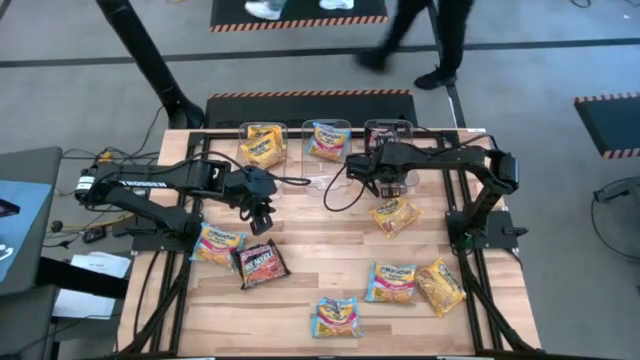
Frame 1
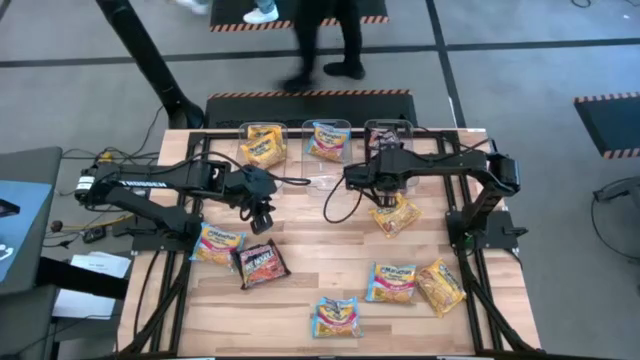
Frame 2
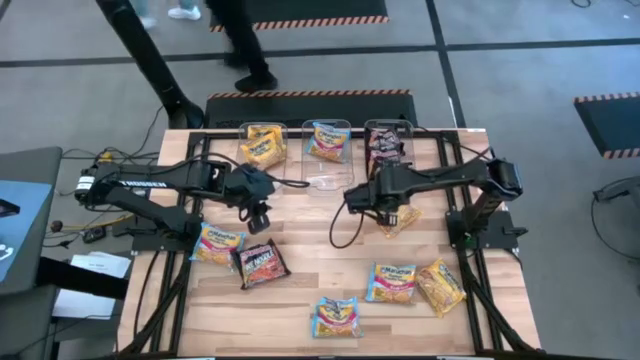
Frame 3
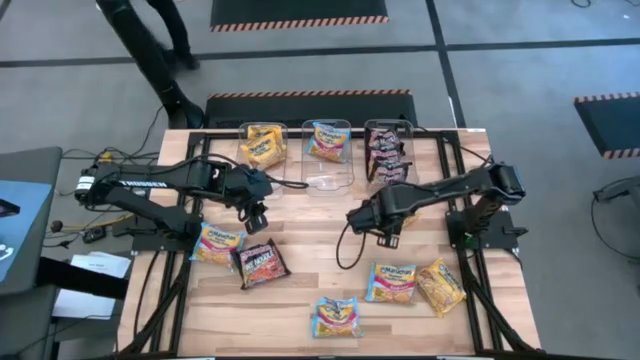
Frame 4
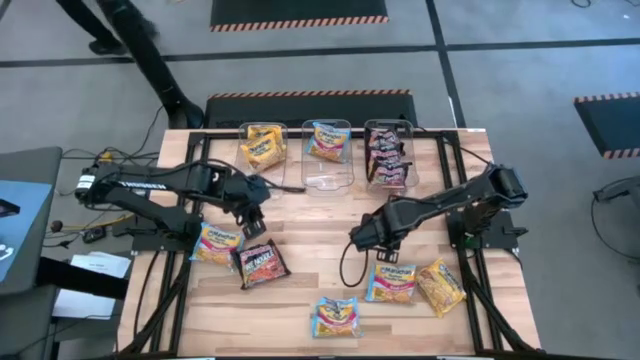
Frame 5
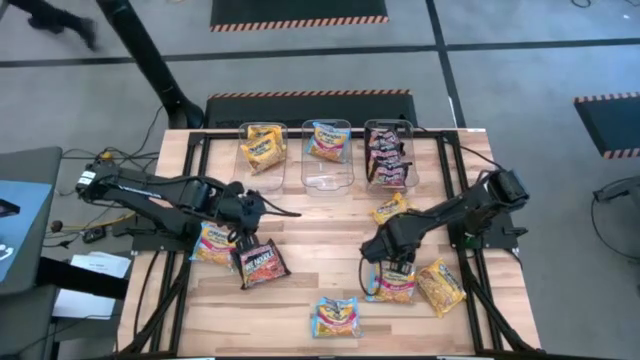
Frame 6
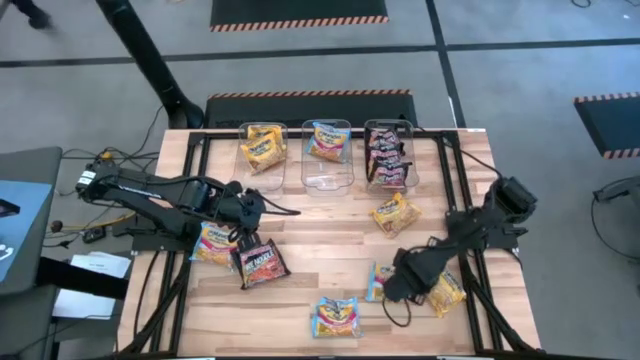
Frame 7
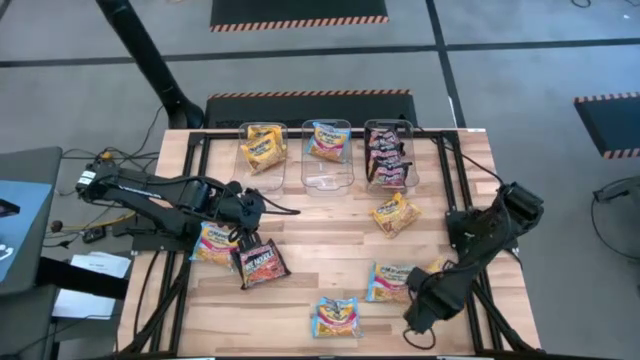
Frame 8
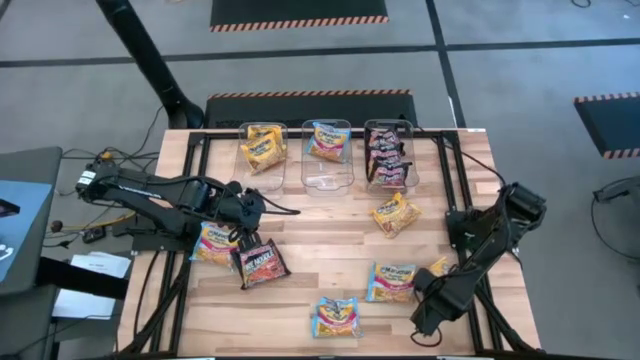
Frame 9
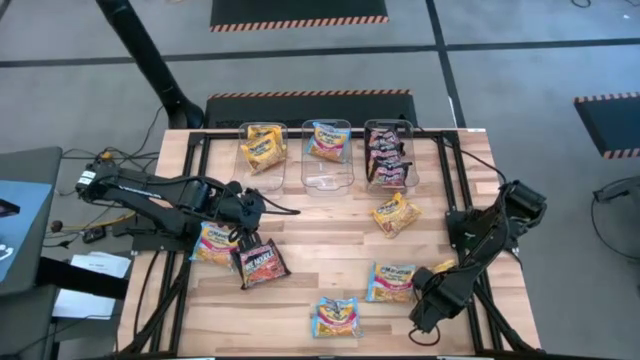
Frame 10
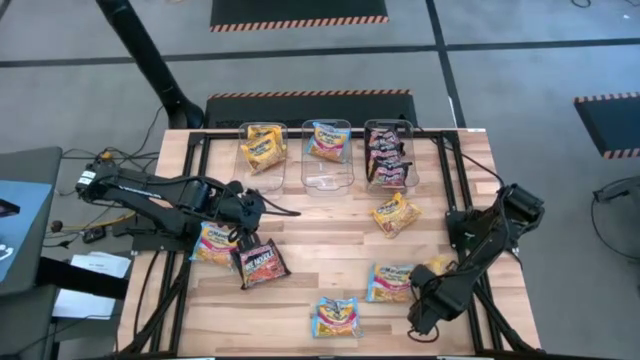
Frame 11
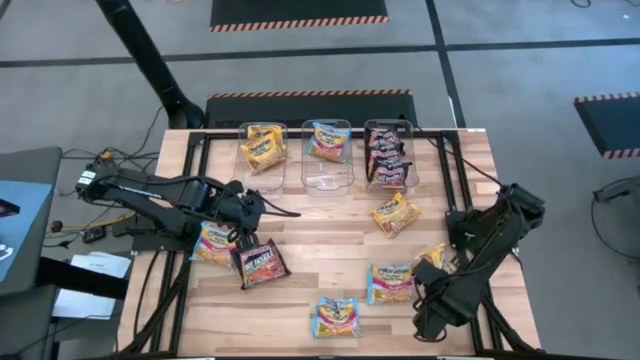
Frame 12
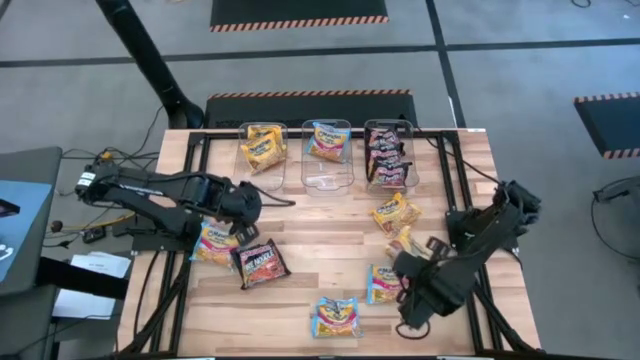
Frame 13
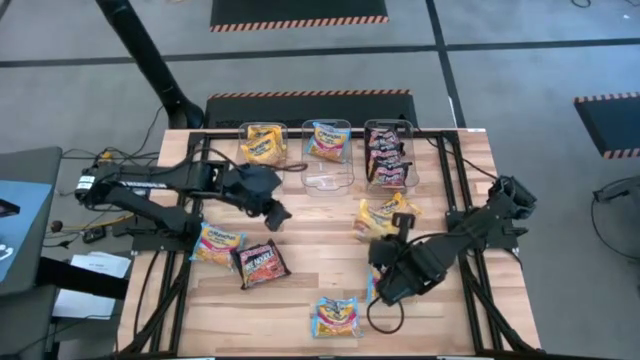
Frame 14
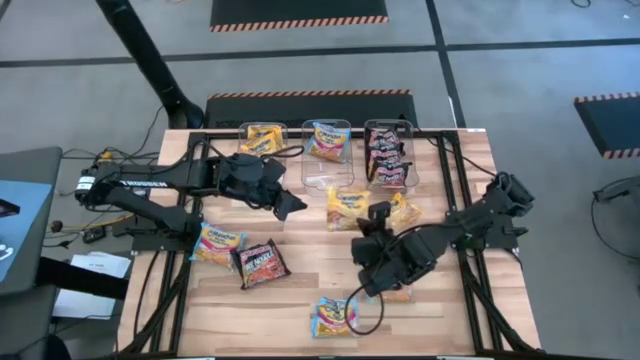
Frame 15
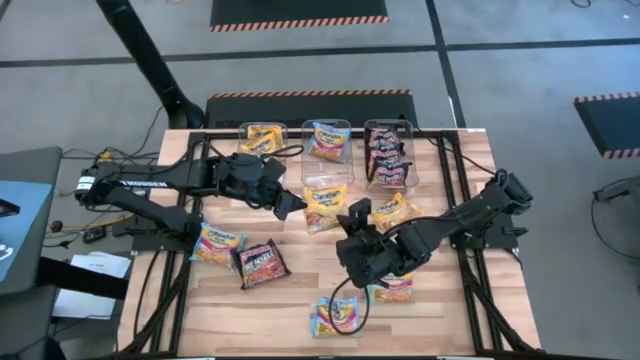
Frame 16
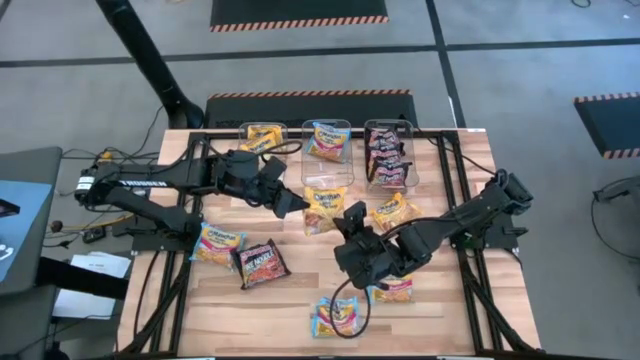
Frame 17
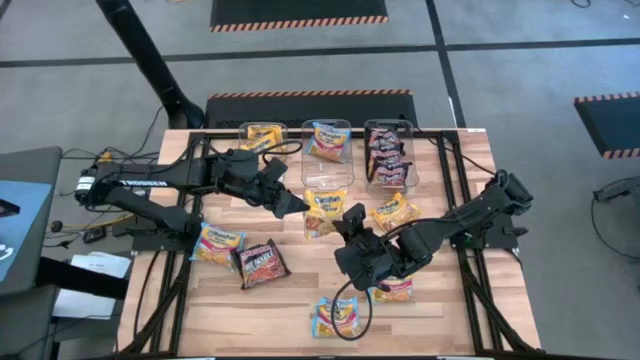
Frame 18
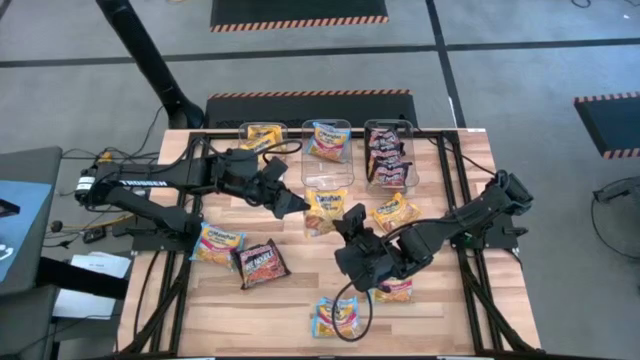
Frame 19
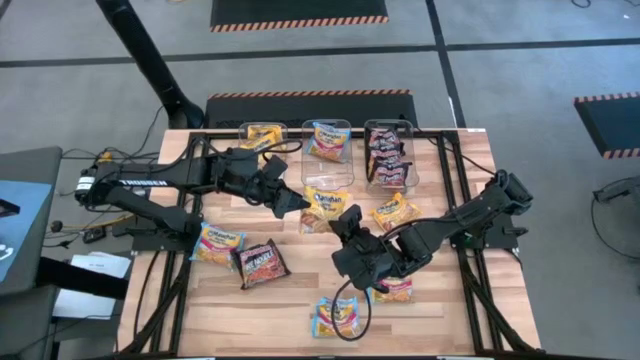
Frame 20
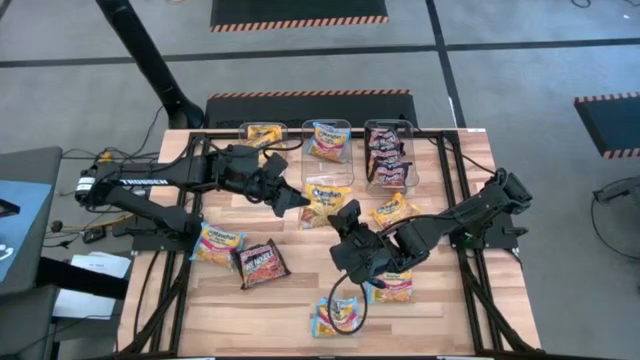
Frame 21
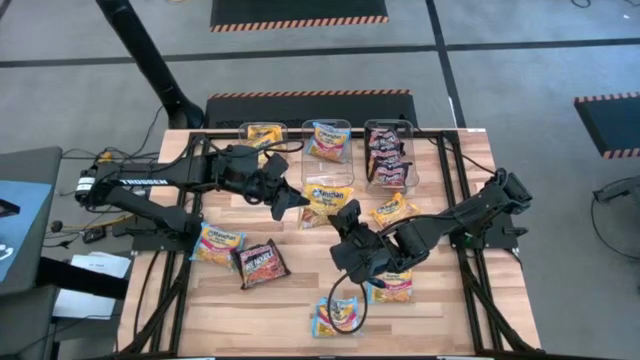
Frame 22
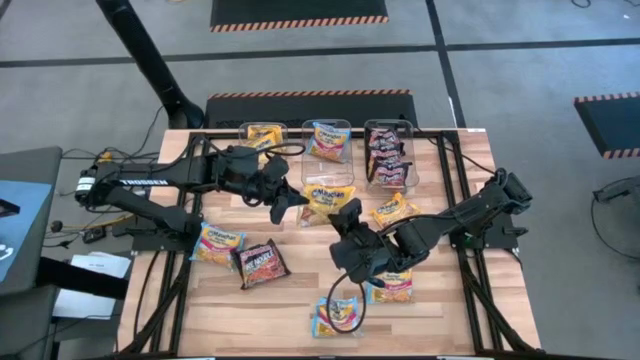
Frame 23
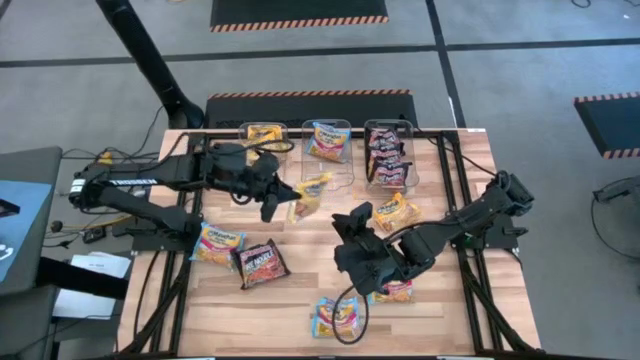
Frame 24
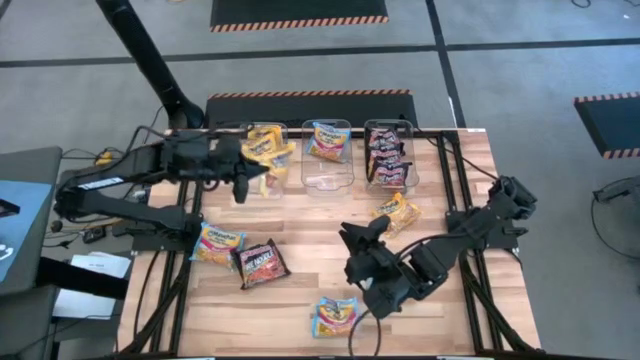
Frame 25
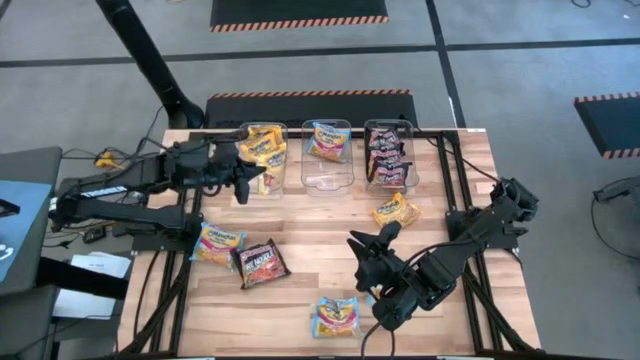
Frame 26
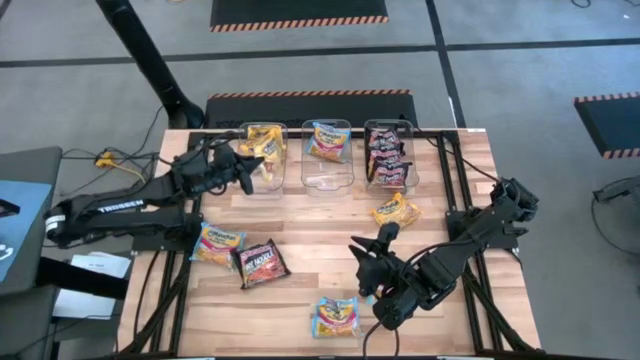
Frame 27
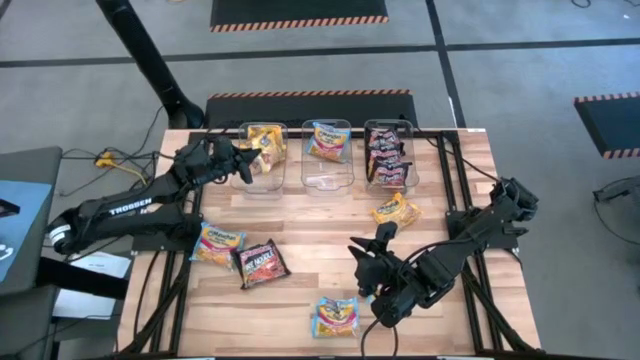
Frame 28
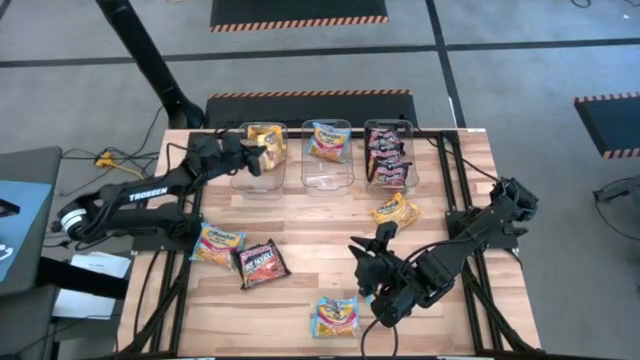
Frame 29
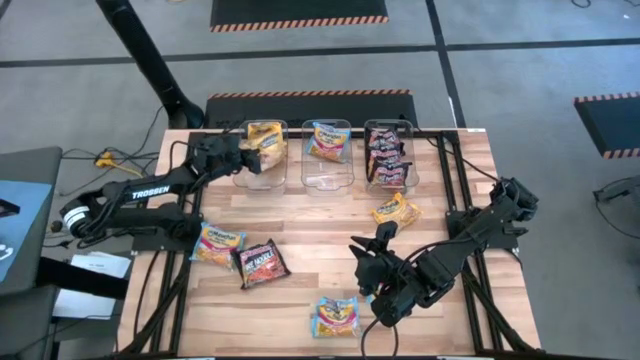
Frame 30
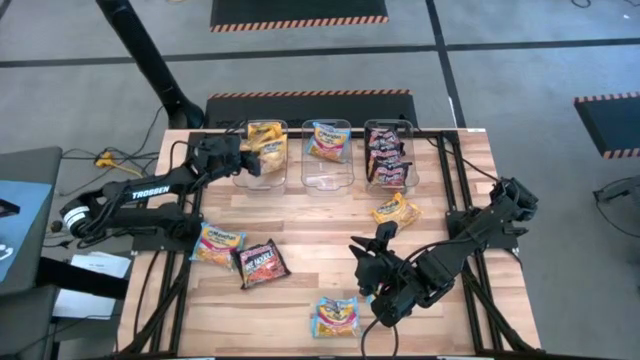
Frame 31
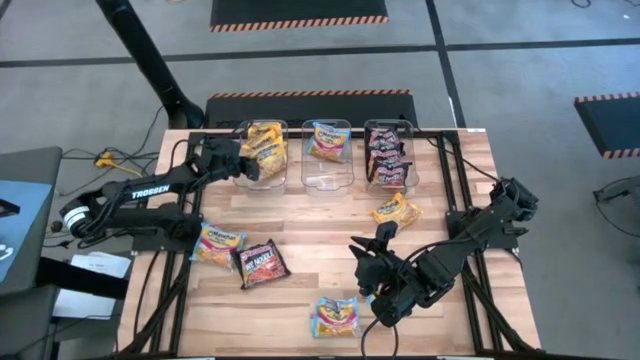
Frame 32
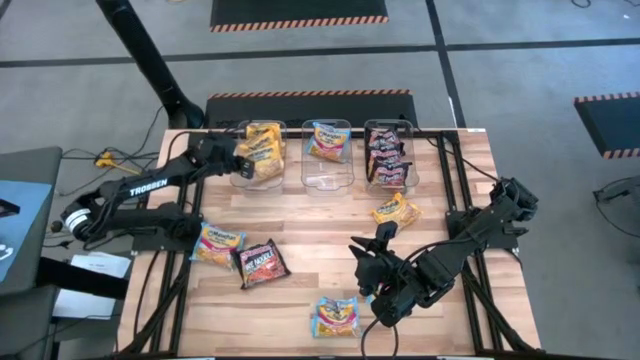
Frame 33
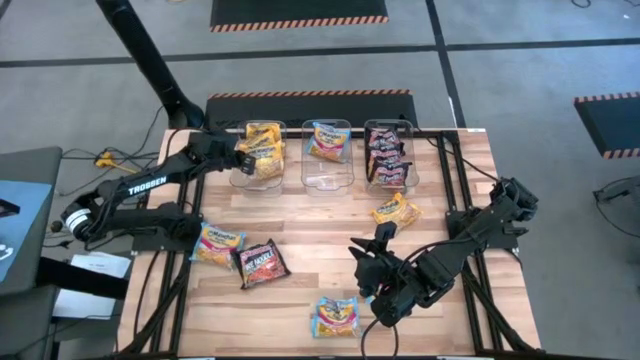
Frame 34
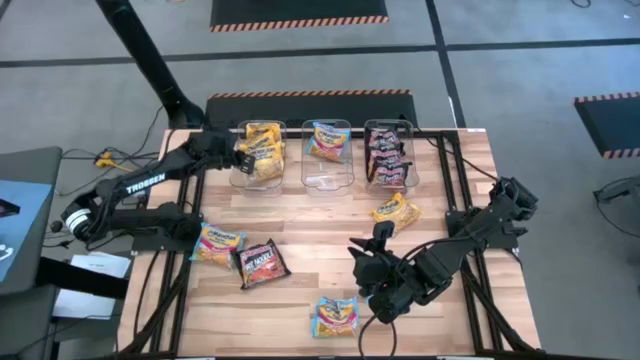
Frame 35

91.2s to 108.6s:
Task: Sort Maruchan noodles
Put the yellow noodle pack into the left transparent bin

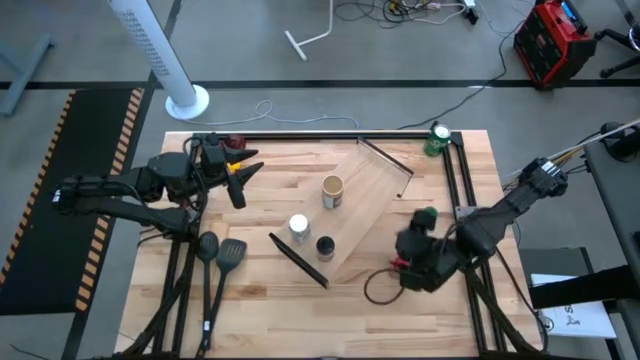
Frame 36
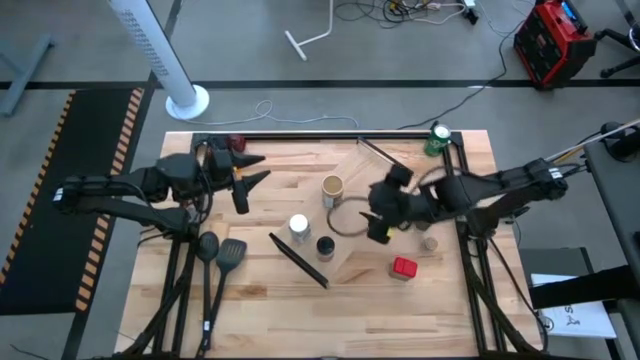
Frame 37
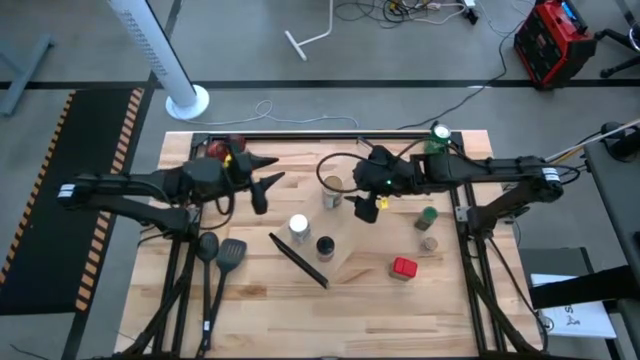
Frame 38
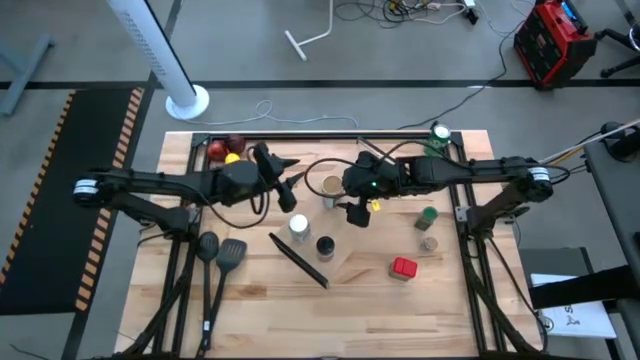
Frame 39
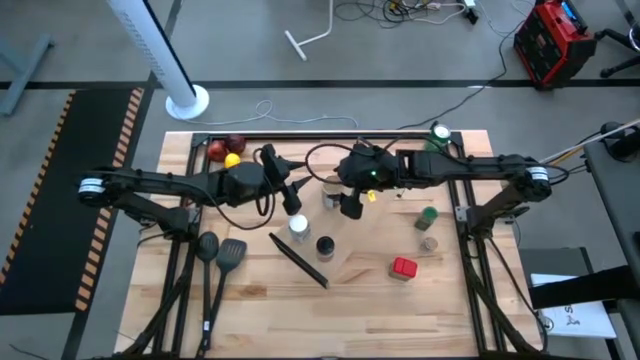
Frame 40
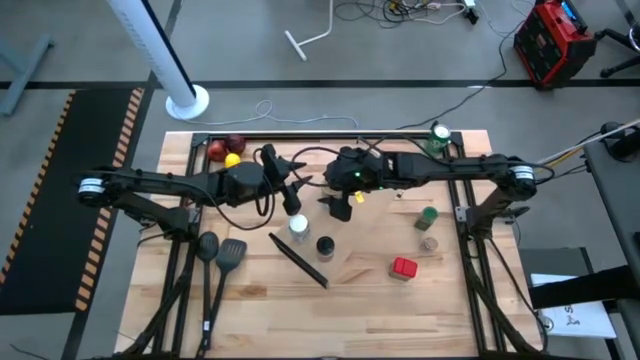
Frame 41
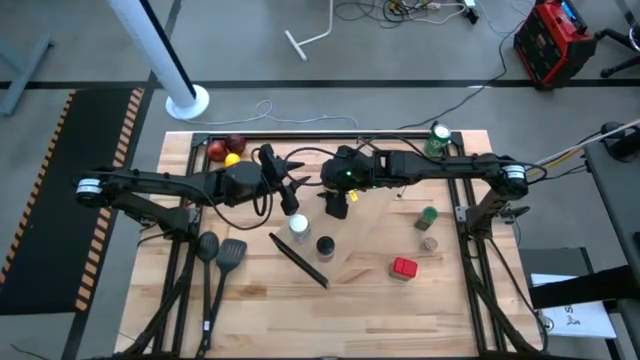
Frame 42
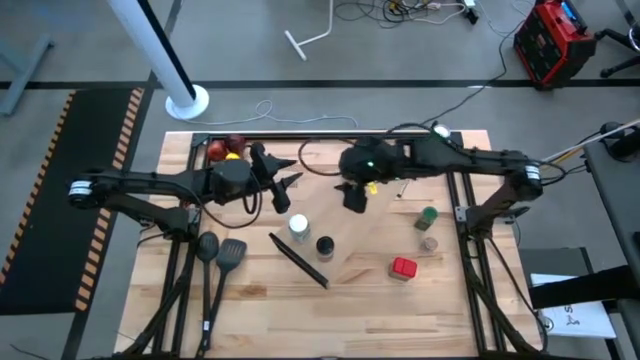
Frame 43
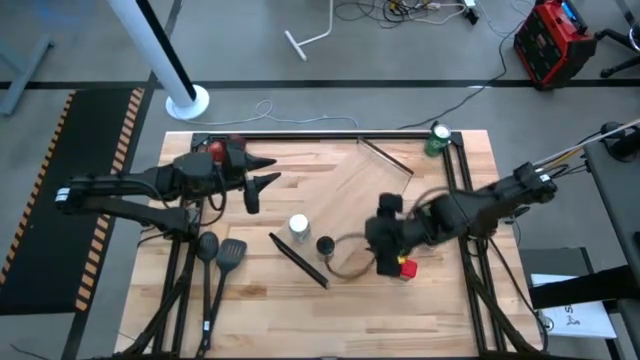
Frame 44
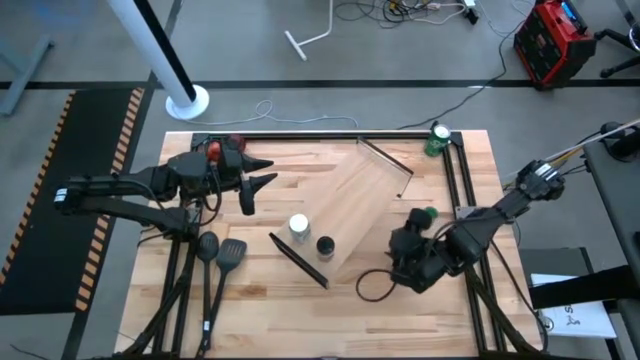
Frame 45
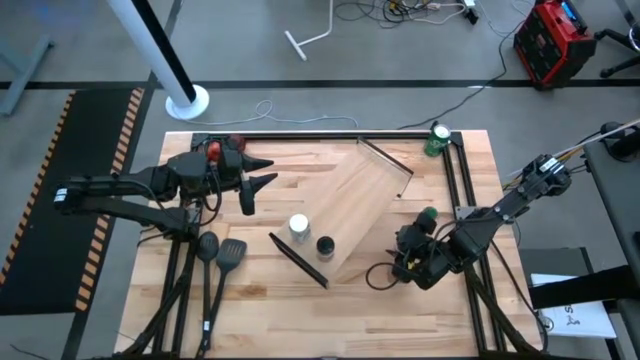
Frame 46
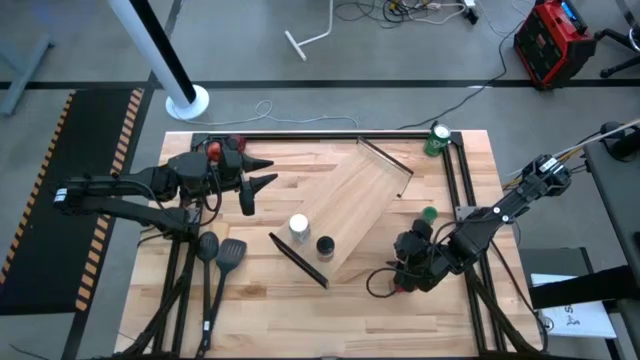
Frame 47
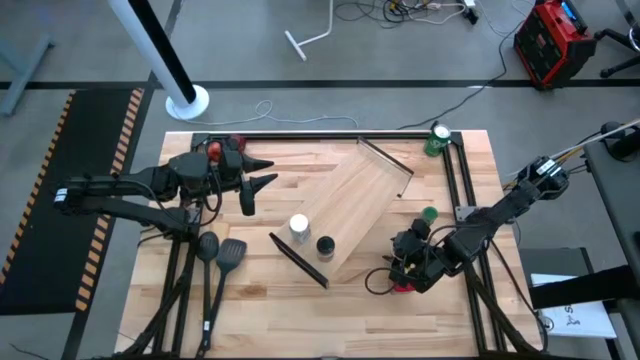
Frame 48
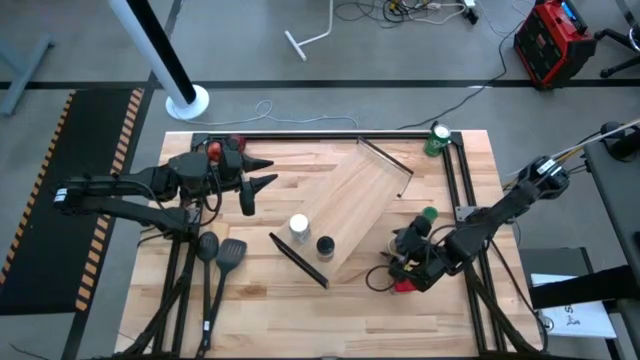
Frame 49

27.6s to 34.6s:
Task: Shelf spices
Remove the golden seasoning bottle from the shelf
